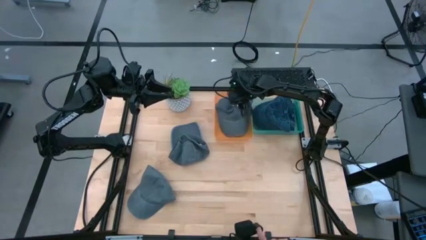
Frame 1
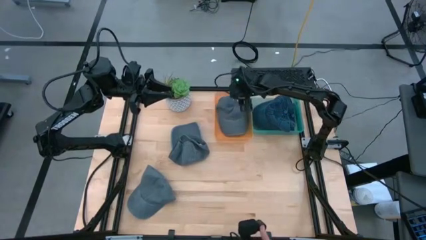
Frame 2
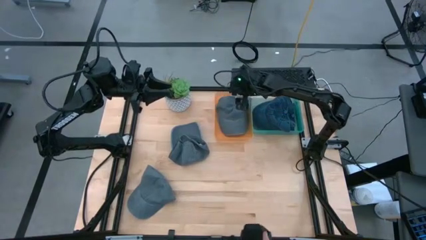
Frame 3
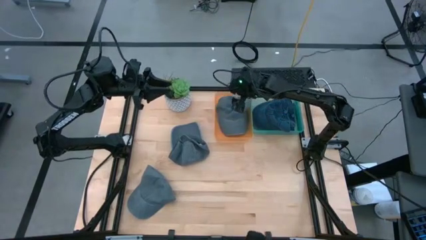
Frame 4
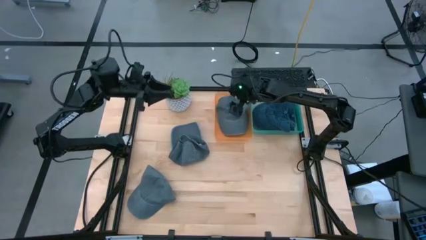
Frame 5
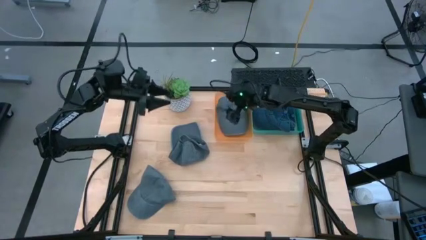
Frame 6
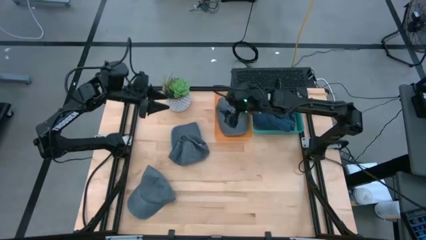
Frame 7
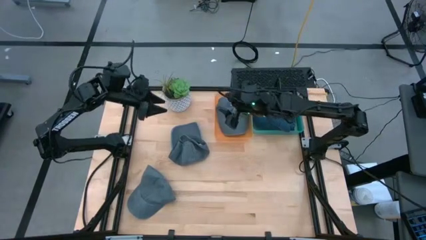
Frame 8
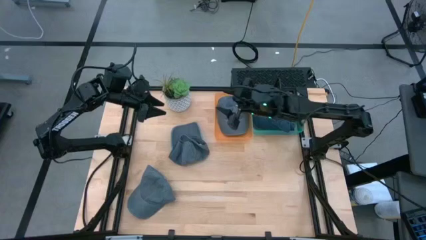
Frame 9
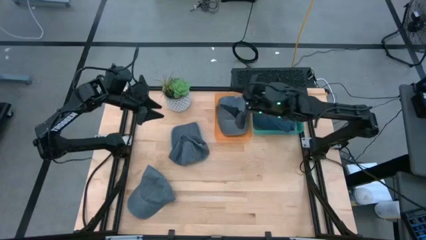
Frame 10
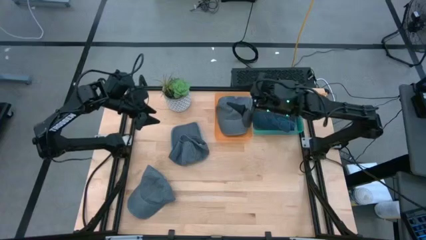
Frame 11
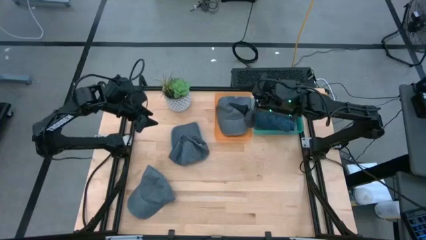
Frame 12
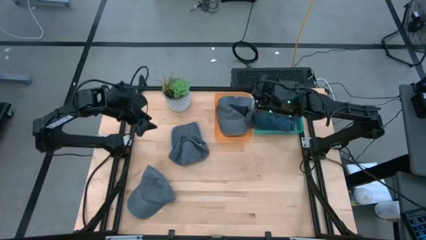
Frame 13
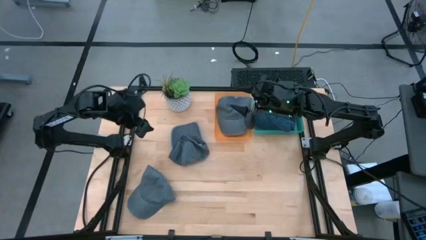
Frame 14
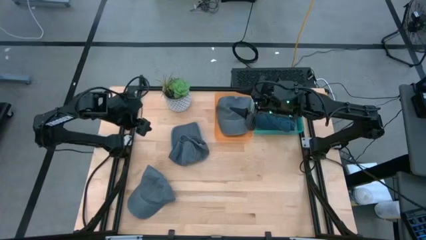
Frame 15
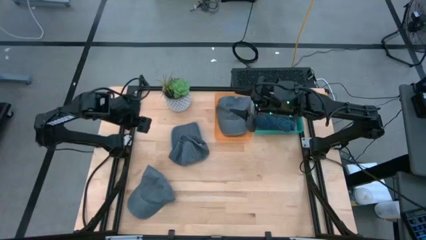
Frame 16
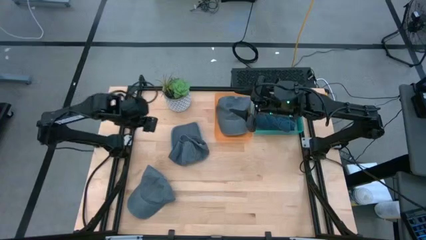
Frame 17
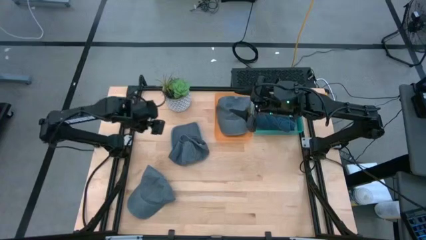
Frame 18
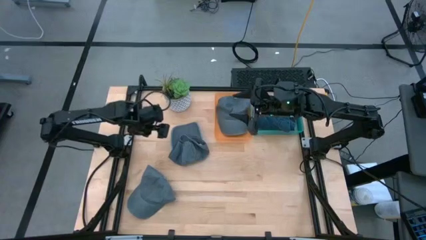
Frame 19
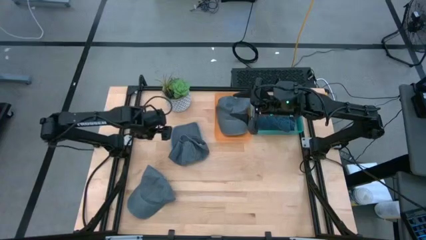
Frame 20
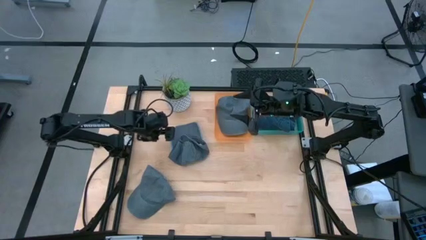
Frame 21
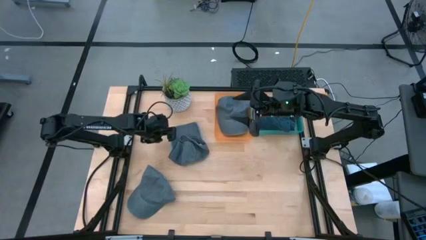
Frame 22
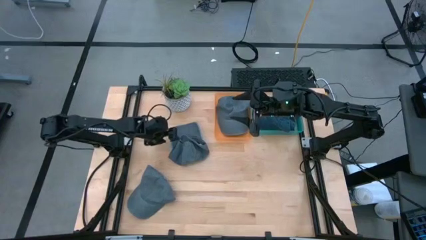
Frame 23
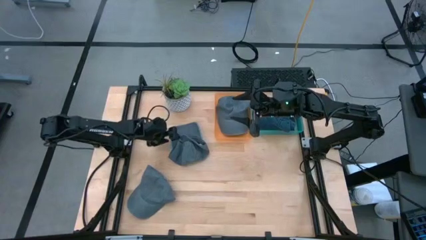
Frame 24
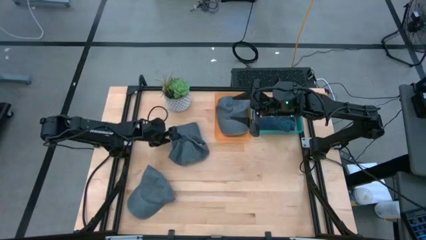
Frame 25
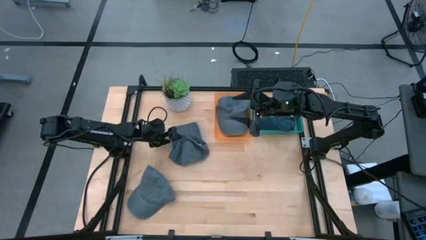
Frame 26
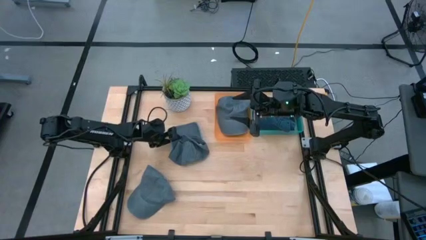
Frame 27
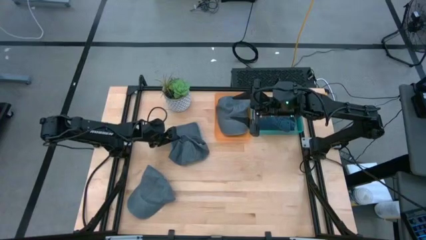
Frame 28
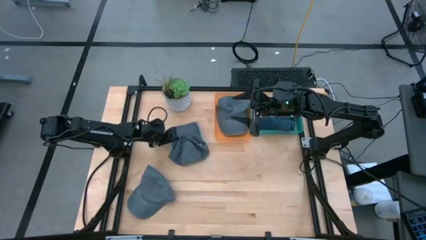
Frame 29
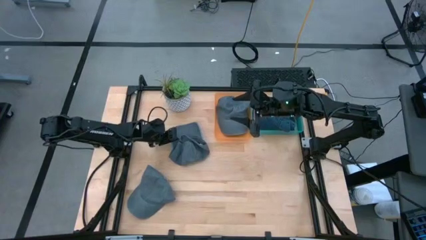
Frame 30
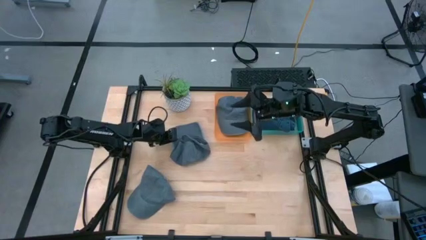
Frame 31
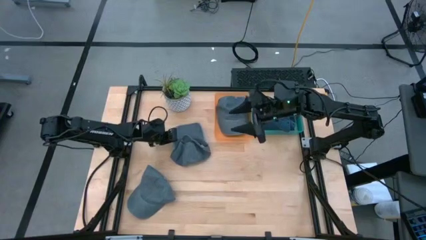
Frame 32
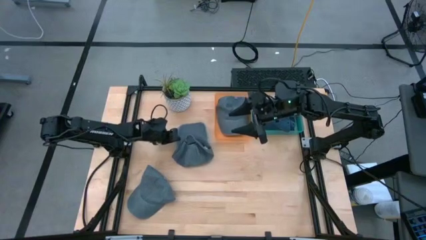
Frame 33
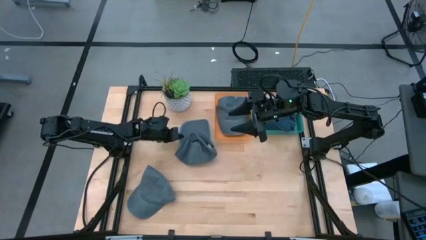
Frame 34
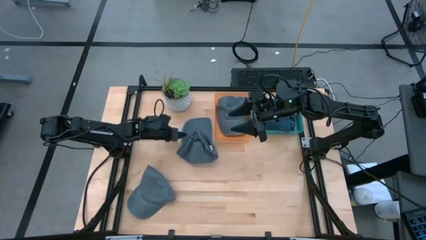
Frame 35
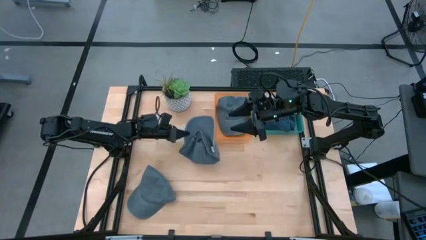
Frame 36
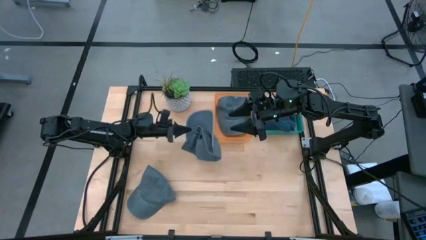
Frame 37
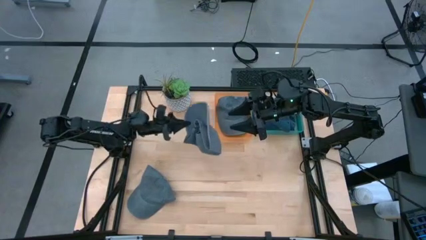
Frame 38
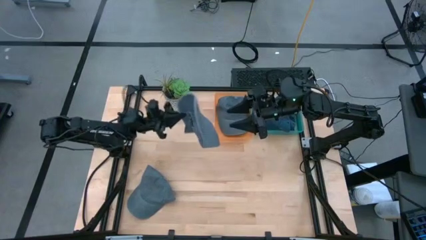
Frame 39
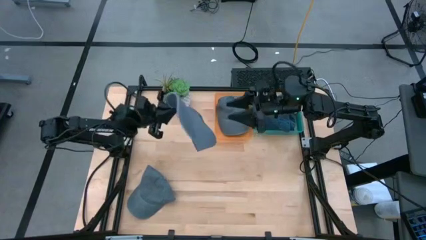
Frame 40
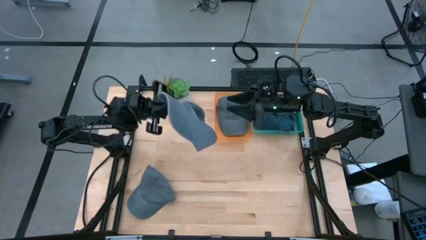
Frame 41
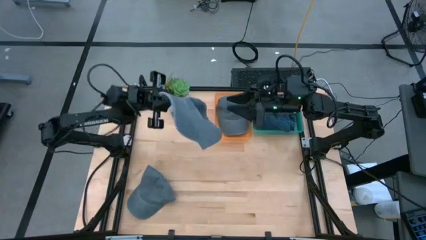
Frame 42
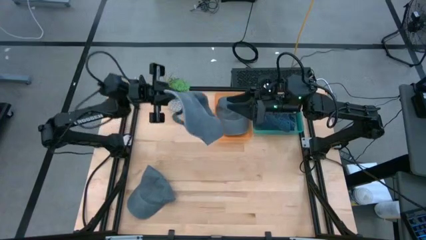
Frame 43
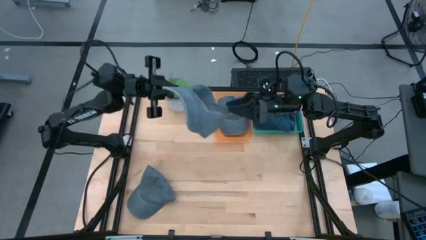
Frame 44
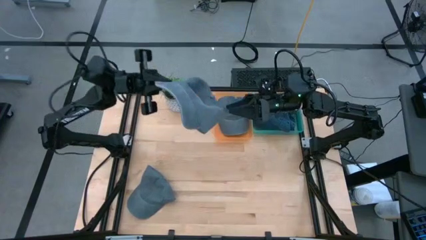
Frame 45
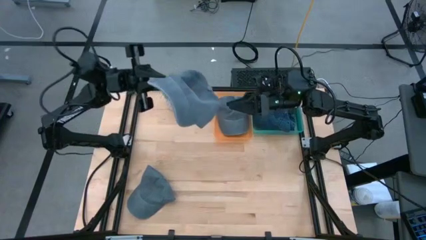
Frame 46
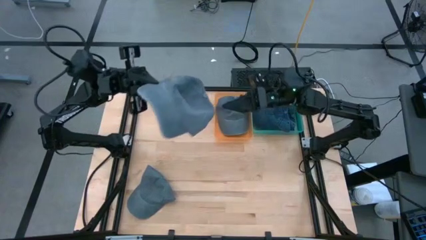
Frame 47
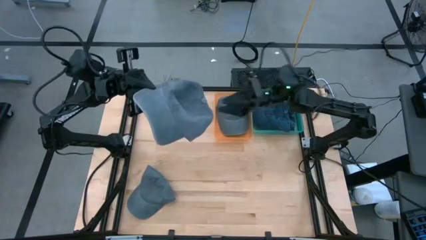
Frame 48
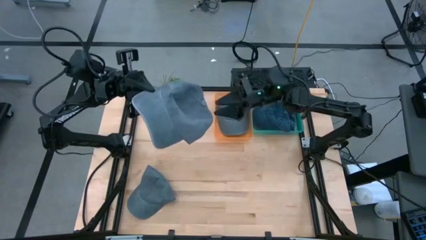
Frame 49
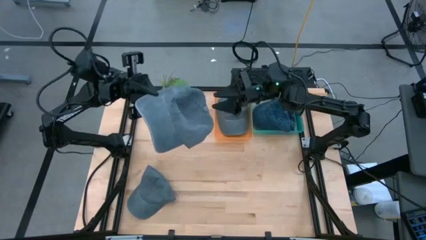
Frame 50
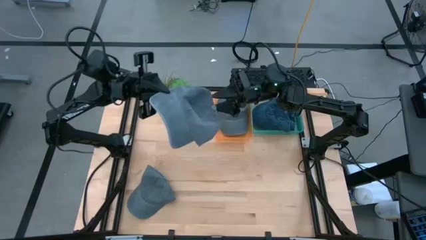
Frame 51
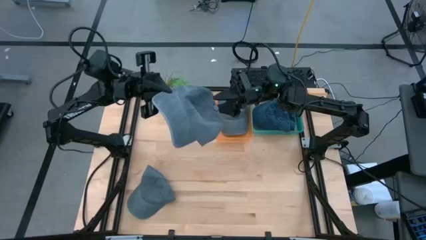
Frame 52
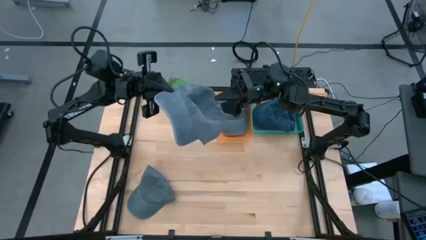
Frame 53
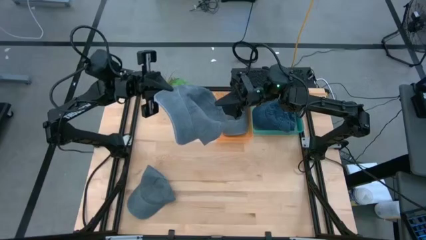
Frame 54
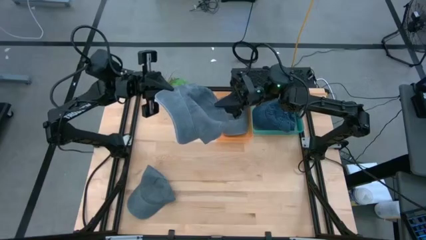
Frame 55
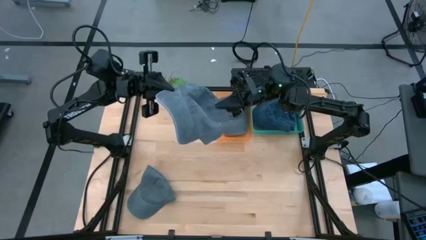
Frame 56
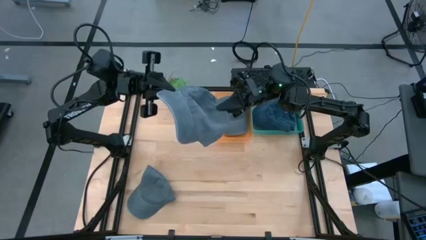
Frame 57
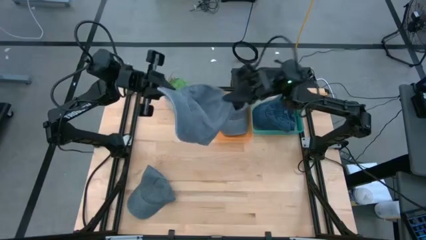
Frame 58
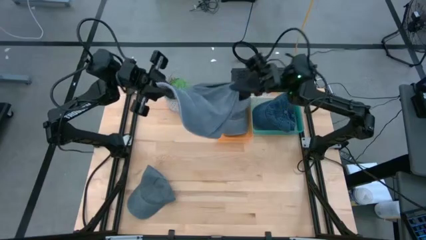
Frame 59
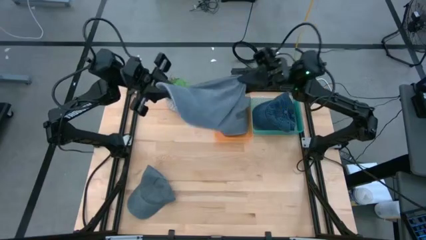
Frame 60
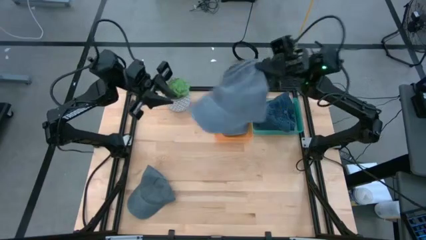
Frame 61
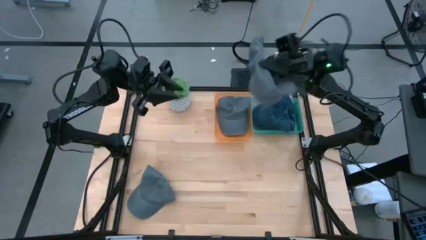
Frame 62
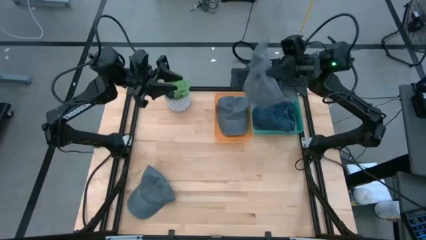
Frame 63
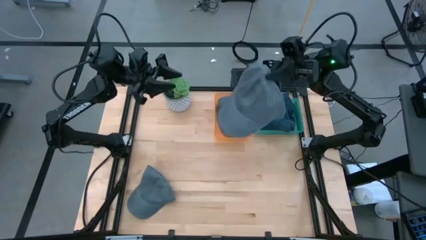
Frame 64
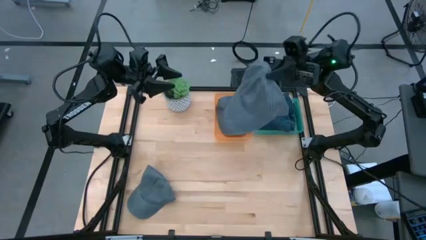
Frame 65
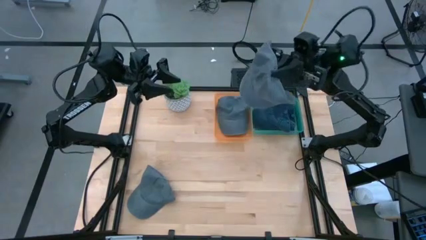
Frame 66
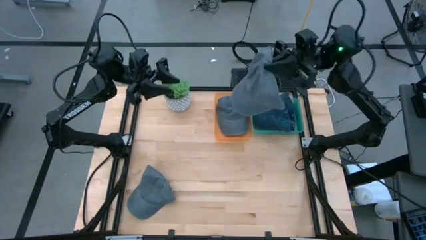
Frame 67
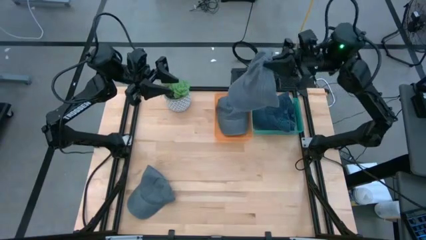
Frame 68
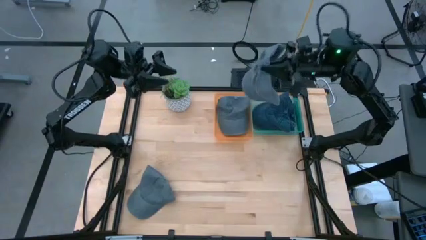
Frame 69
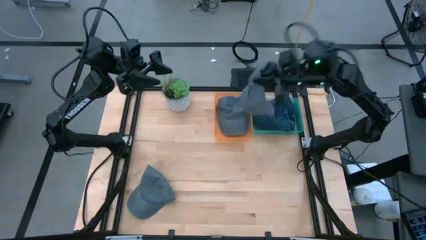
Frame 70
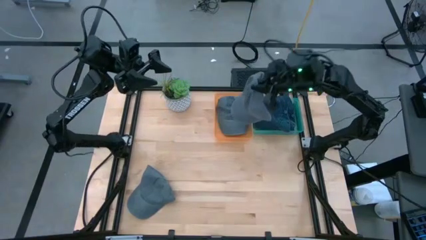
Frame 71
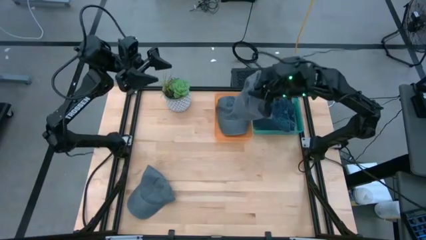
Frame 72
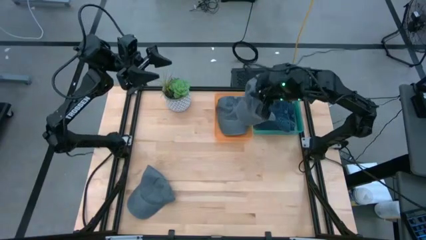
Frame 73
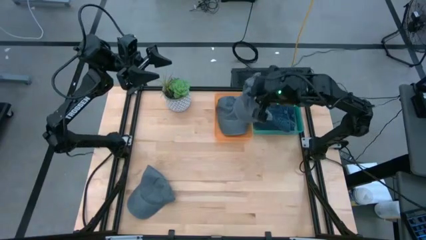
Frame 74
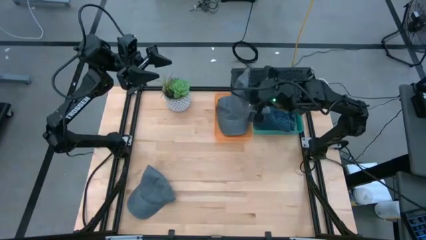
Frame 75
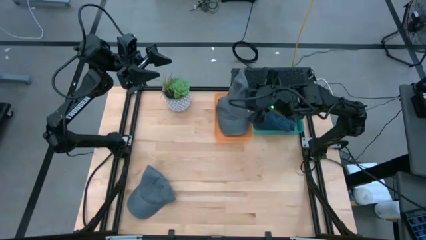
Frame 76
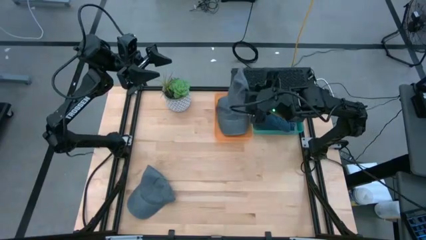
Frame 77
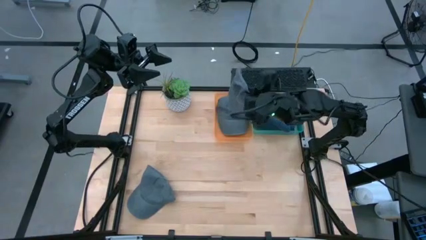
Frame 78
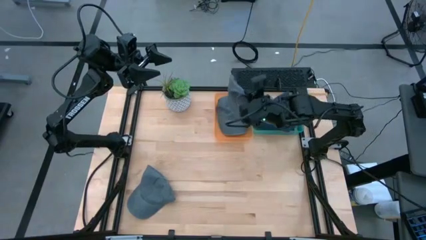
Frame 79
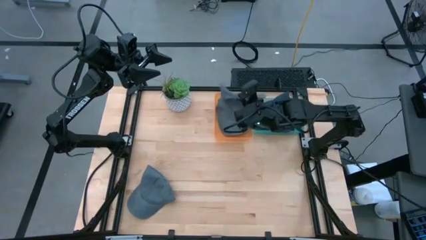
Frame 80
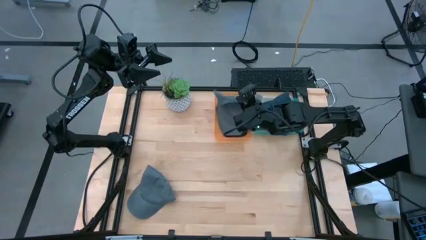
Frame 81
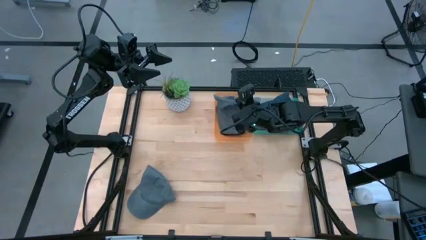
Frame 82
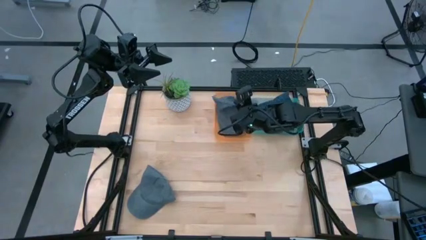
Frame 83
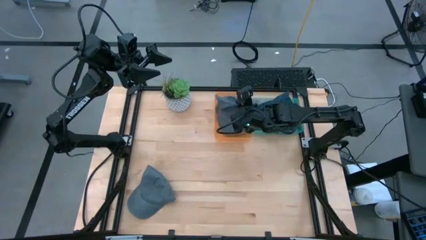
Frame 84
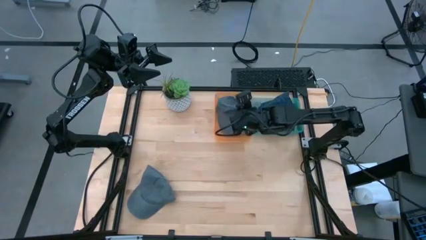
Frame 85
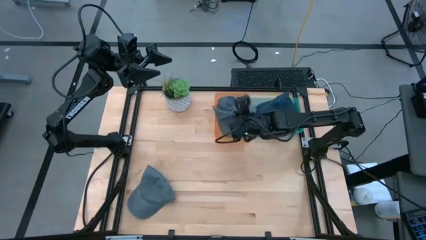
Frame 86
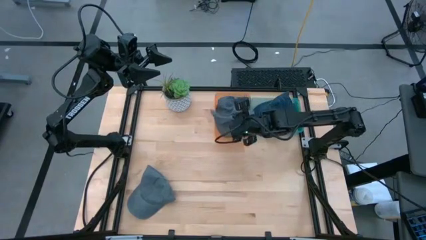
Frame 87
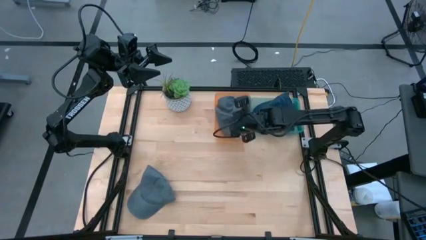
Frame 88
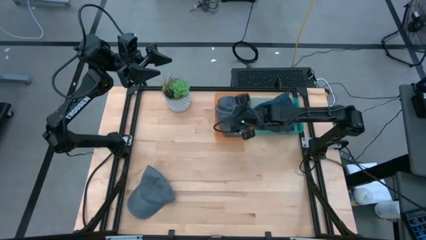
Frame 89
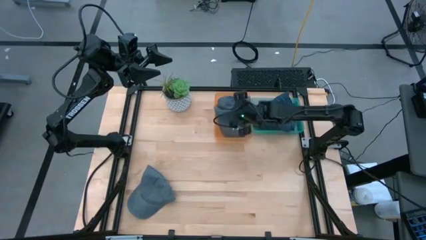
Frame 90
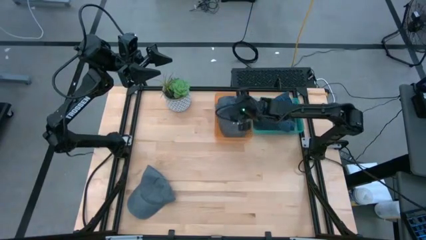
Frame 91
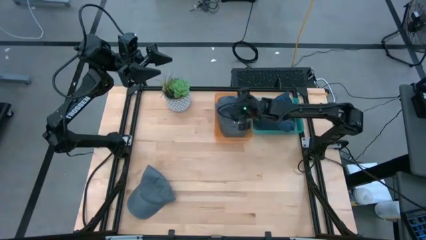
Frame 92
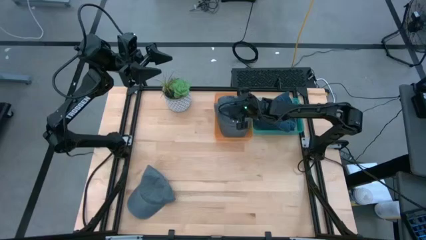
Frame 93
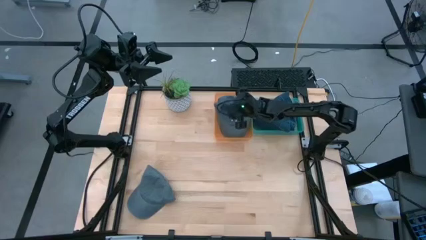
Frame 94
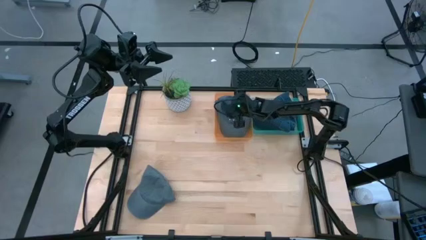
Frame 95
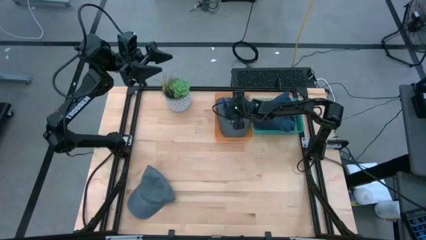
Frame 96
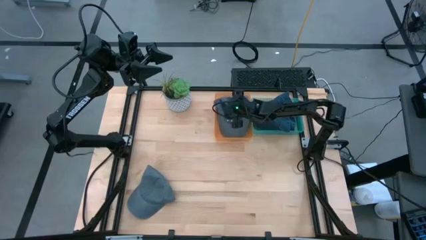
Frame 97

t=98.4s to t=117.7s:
Task: Pick & Place hat
Put the top gray cap in the orange bin
